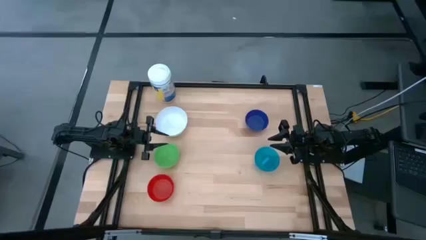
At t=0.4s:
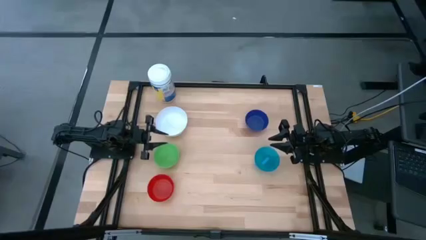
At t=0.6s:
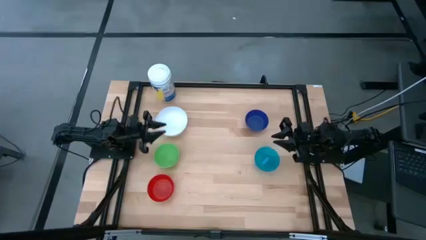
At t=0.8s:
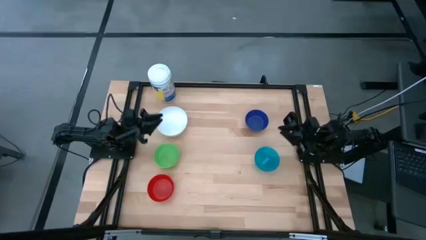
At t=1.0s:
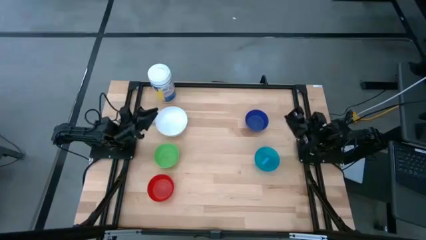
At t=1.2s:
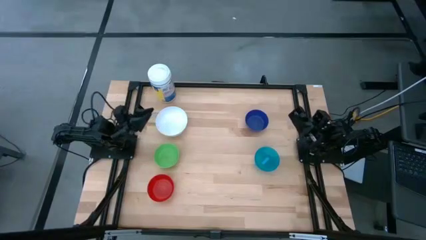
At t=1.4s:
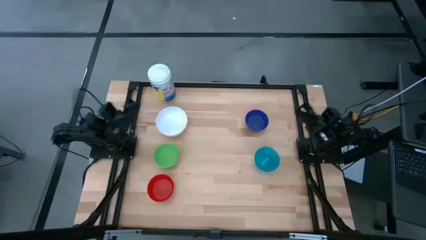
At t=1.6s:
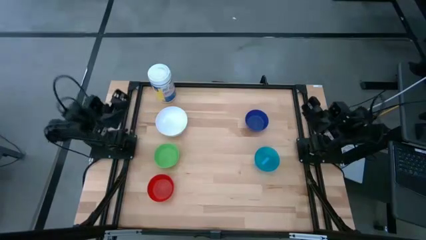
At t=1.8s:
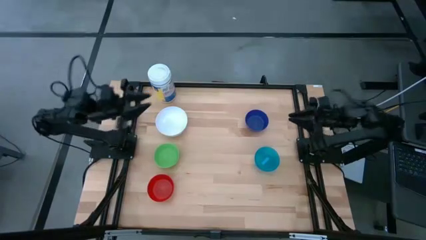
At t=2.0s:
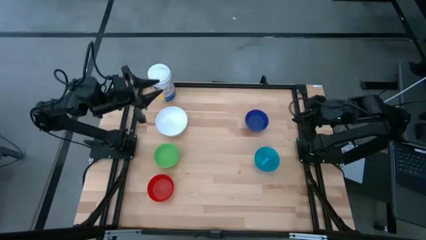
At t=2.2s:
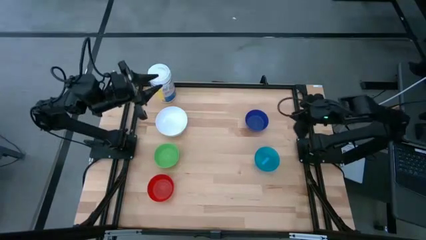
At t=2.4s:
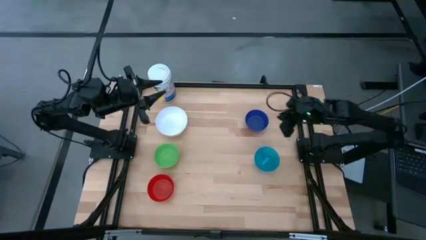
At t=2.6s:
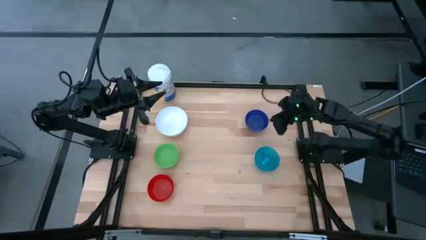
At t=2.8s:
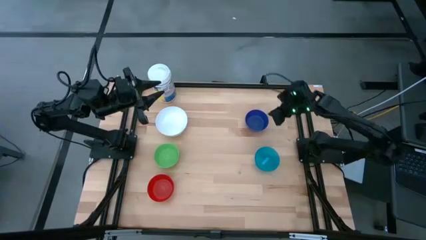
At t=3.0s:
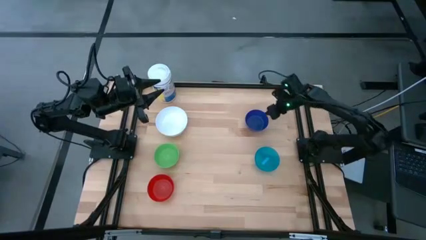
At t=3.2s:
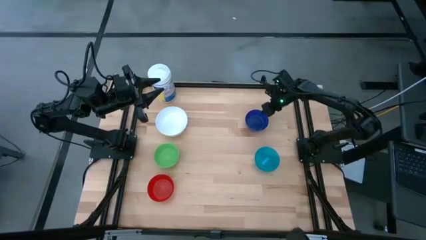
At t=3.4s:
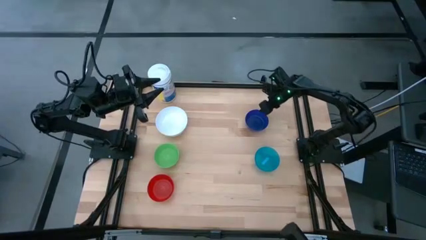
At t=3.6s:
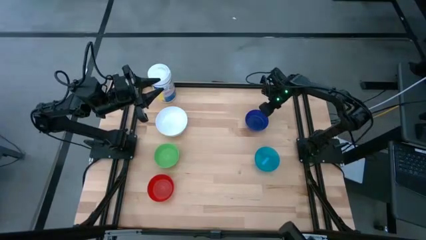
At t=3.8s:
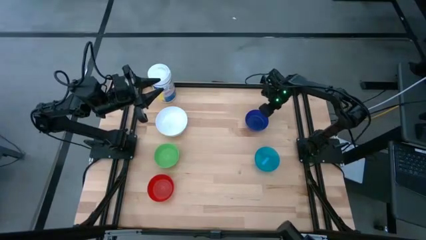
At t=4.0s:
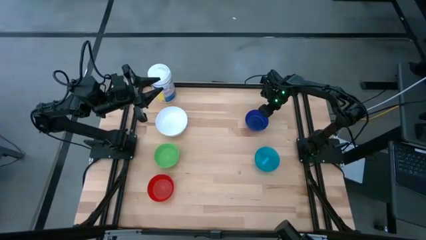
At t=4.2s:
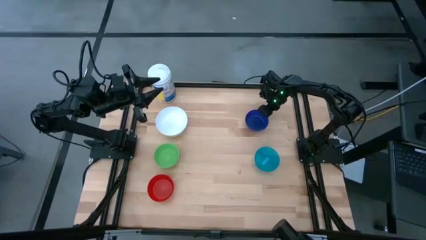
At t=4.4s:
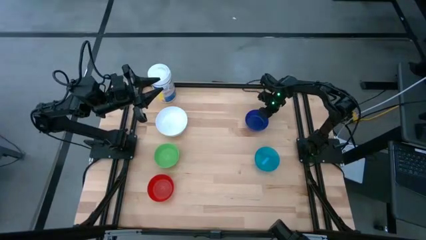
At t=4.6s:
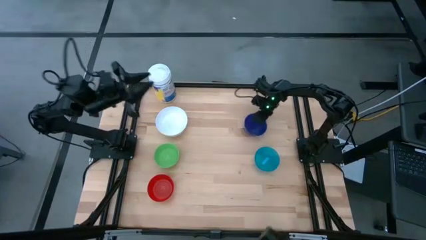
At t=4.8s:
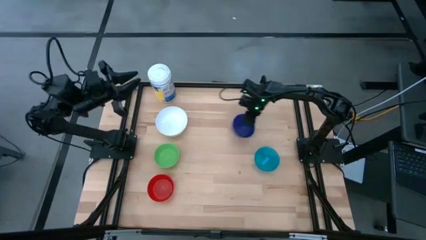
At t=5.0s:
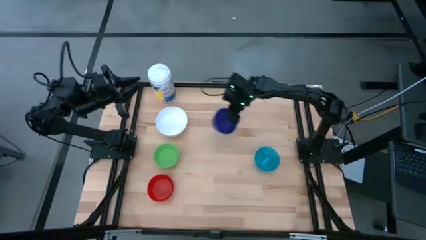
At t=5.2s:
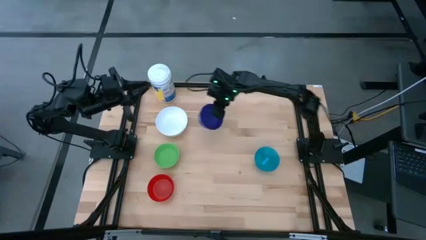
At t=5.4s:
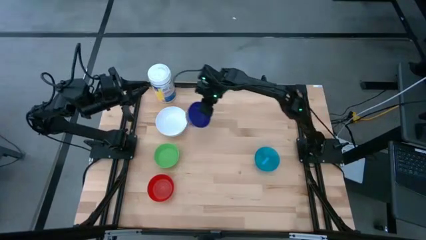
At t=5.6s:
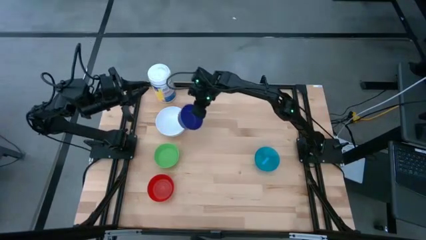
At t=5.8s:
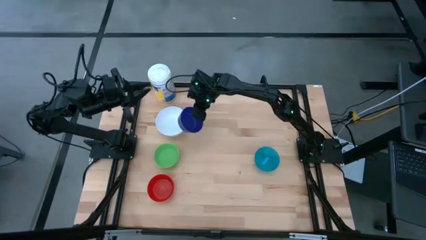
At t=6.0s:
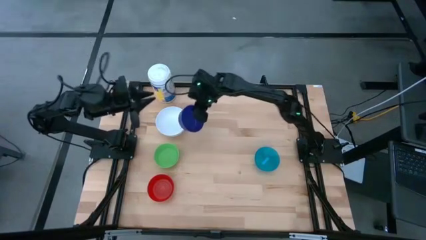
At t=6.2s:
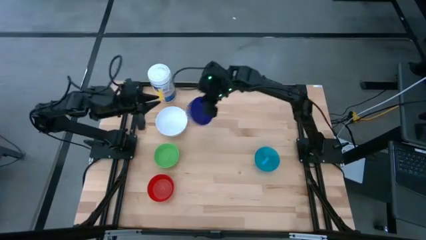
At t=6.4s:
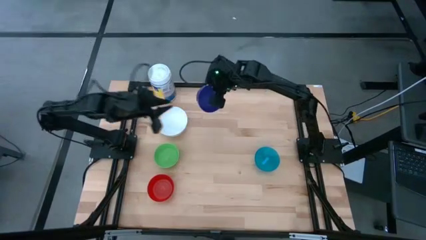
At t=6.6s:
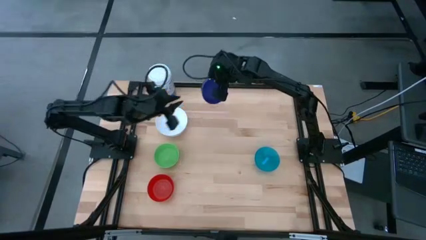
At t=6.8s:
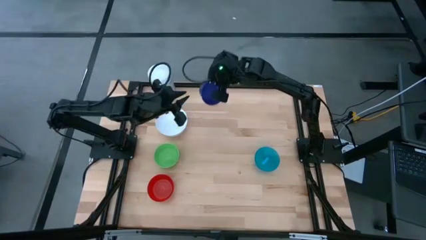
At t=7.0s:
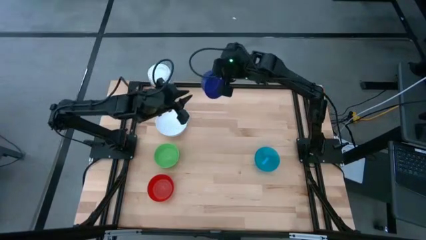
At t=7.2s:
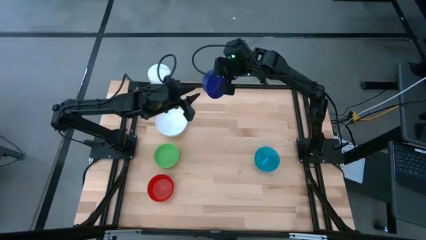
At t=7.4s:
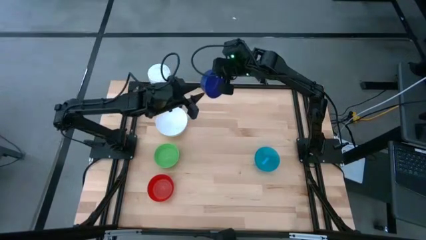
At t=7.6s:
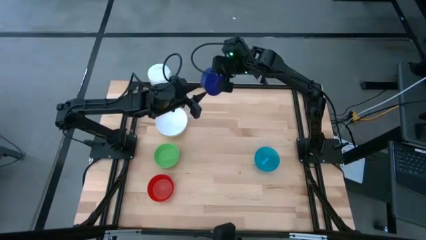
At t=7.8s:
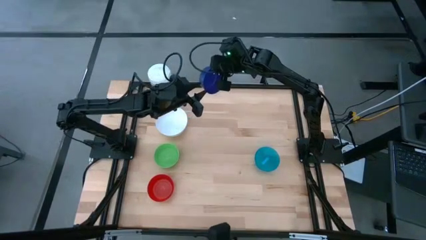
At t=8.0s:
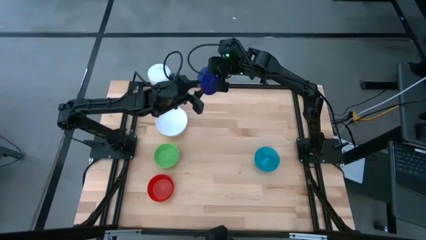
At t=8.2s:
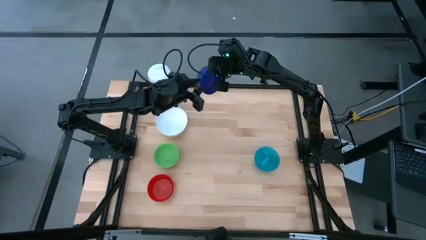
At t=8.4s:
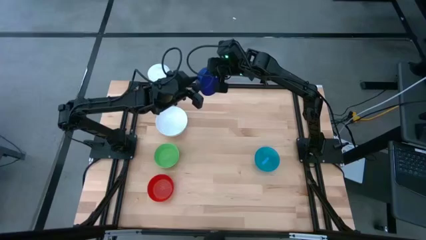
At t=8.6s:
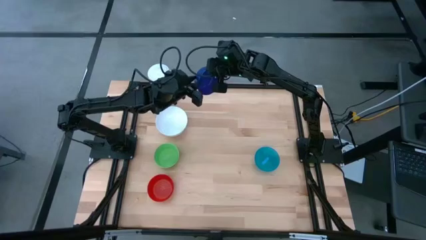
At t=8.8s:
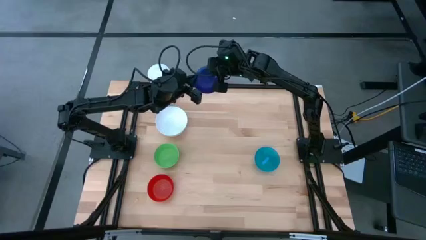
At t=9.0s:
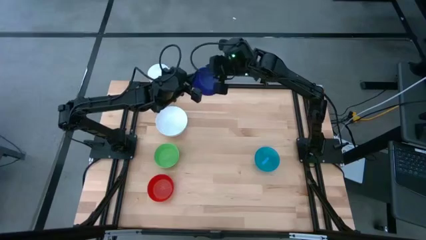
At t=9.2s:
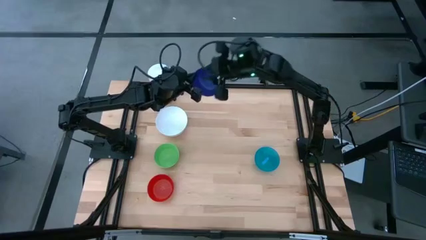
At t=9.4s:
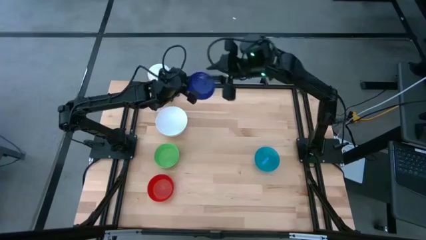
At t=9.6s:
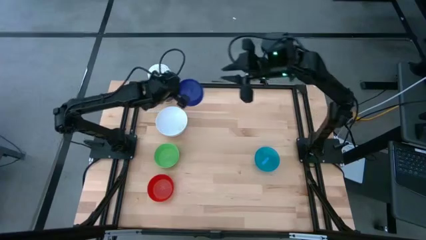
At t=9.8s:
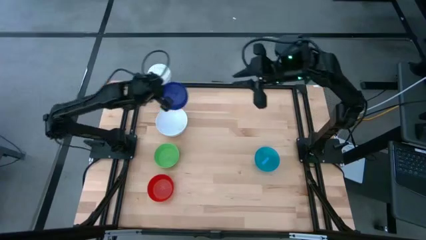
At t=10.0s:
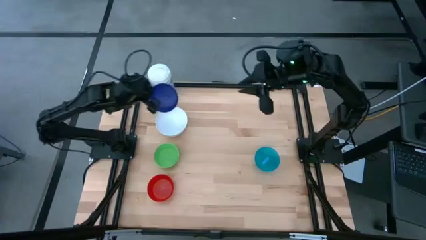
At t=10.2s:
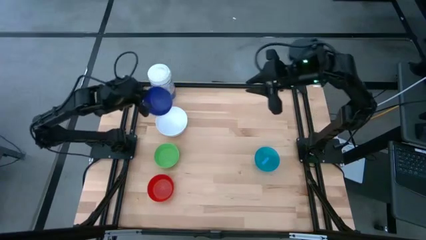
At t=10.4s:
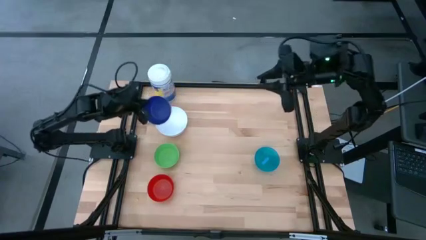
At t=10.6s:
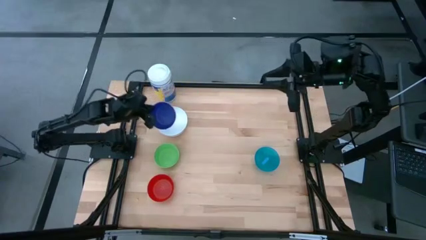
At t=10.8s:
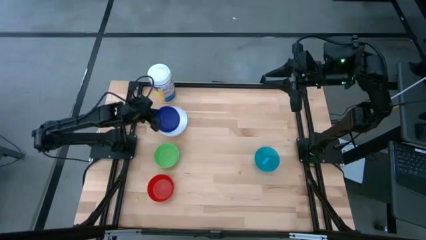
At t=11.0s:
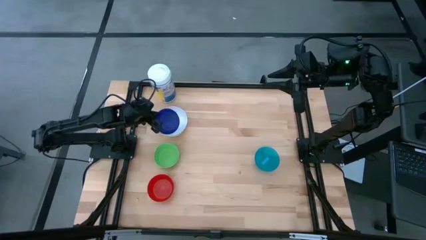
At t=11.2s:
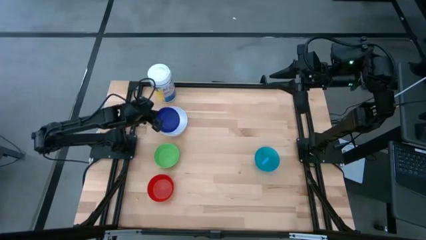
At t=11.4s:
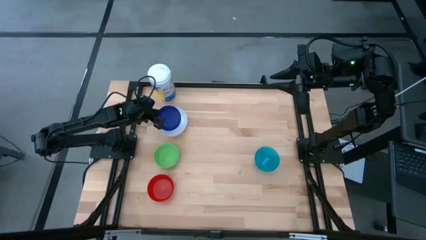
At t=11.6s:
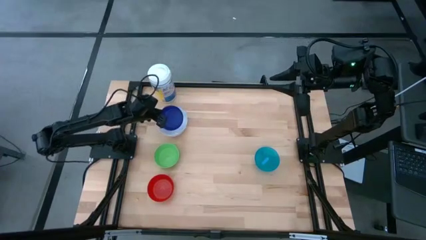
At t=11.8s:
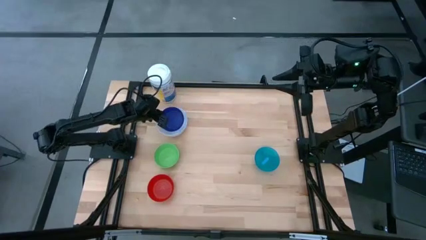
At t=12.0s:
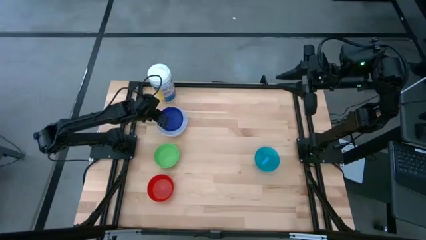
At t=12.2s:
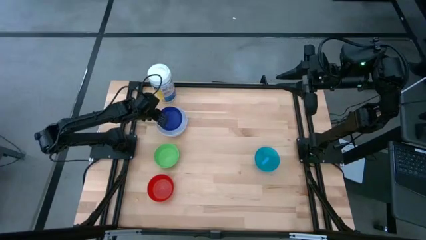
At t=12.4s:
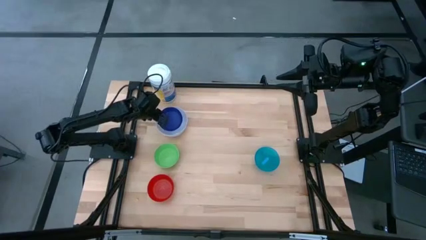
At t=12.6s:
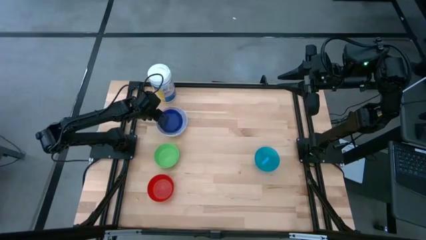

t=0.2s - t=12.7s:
Stack the blue bowl on top of the white bowl
